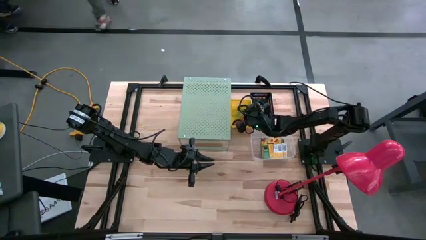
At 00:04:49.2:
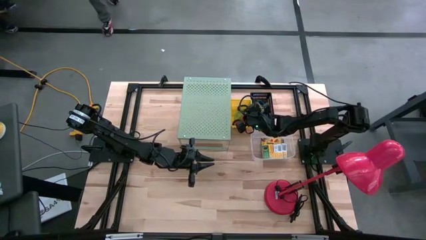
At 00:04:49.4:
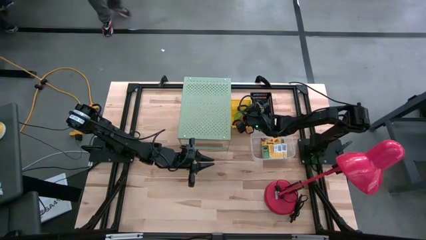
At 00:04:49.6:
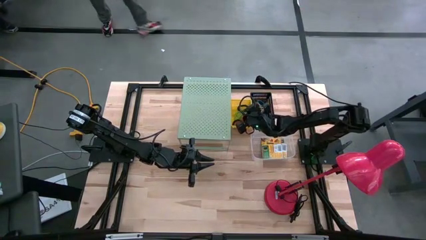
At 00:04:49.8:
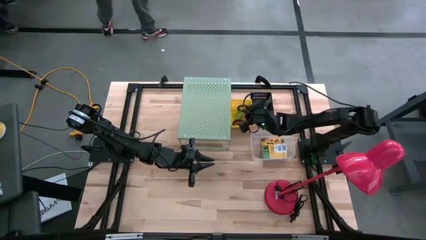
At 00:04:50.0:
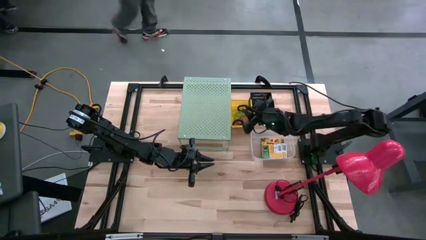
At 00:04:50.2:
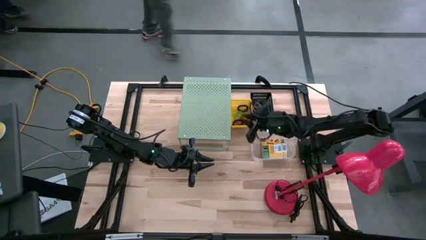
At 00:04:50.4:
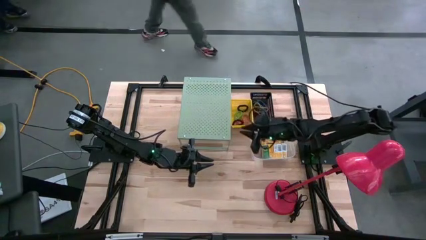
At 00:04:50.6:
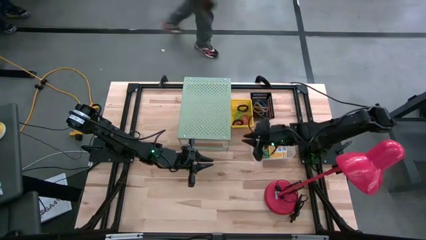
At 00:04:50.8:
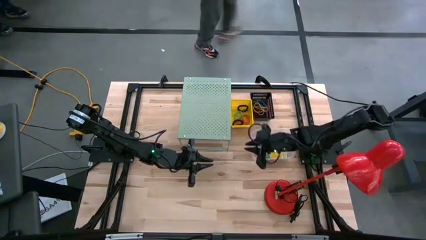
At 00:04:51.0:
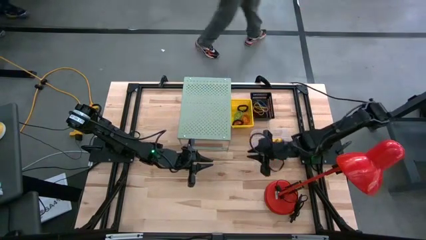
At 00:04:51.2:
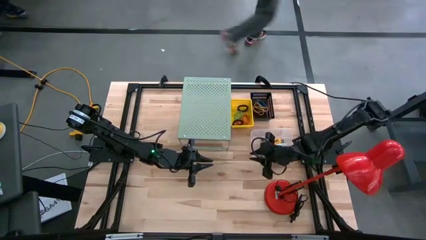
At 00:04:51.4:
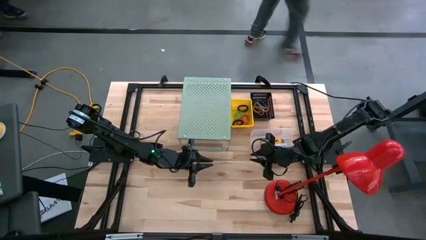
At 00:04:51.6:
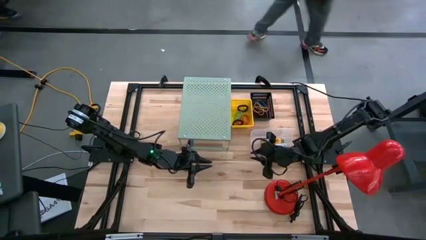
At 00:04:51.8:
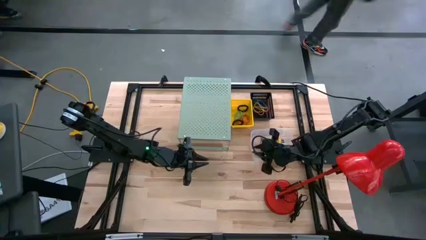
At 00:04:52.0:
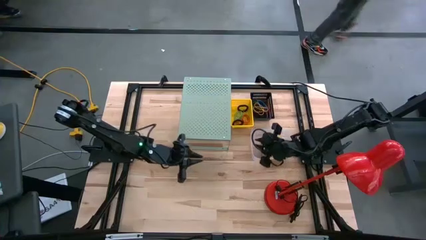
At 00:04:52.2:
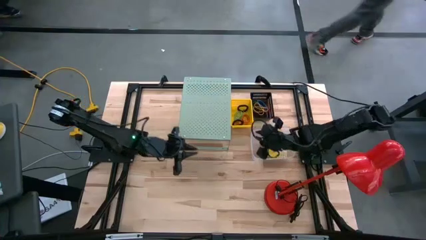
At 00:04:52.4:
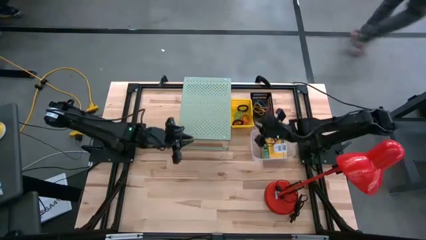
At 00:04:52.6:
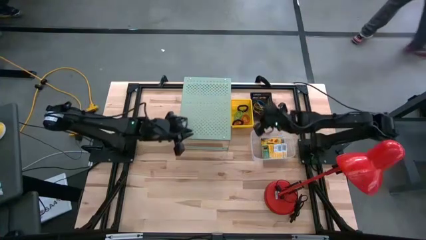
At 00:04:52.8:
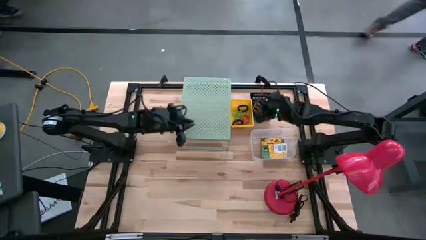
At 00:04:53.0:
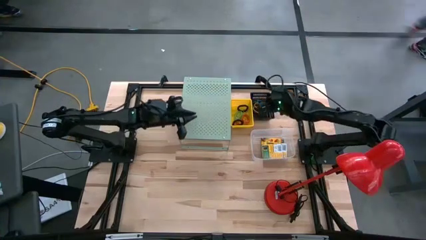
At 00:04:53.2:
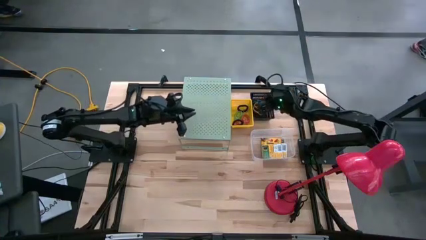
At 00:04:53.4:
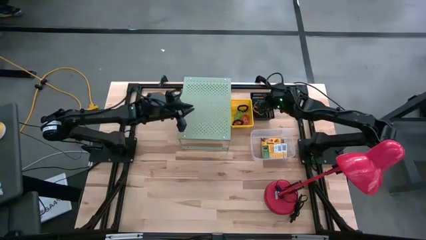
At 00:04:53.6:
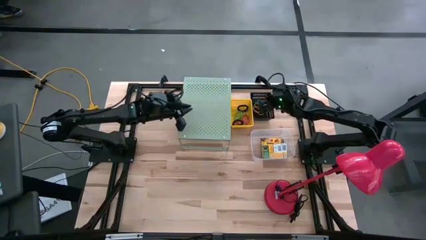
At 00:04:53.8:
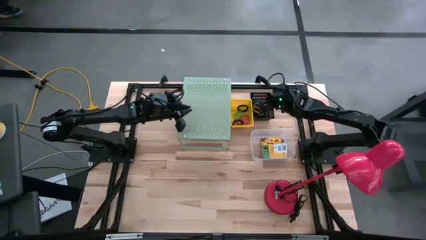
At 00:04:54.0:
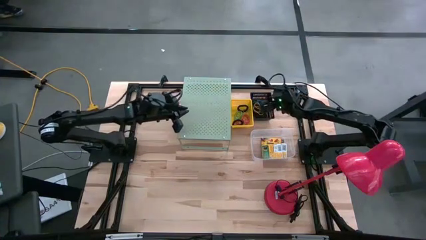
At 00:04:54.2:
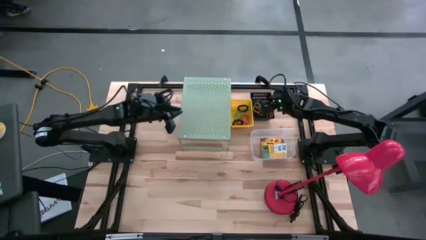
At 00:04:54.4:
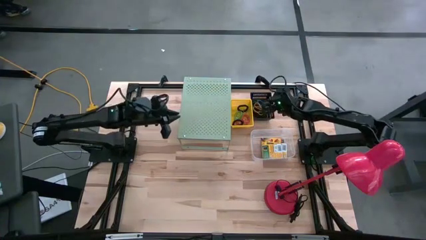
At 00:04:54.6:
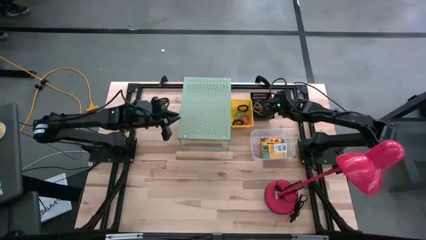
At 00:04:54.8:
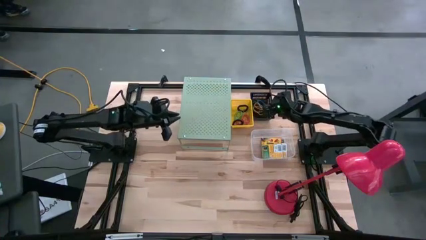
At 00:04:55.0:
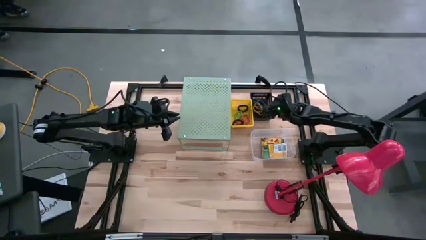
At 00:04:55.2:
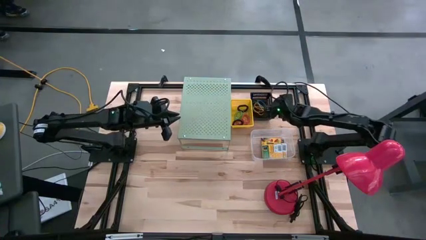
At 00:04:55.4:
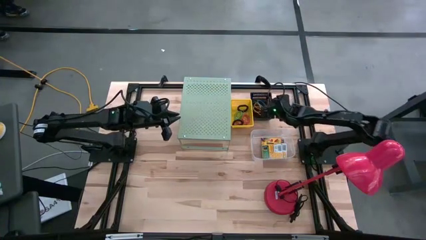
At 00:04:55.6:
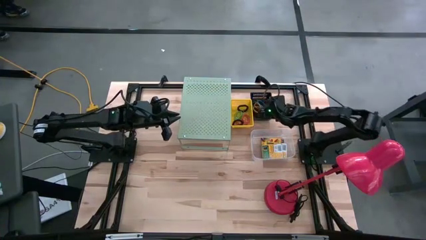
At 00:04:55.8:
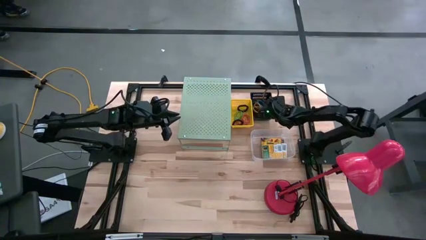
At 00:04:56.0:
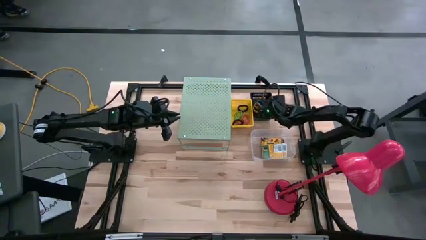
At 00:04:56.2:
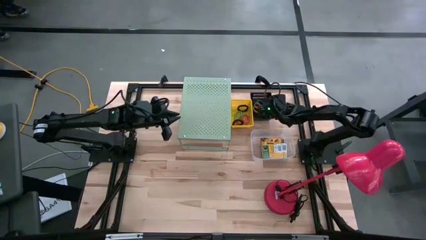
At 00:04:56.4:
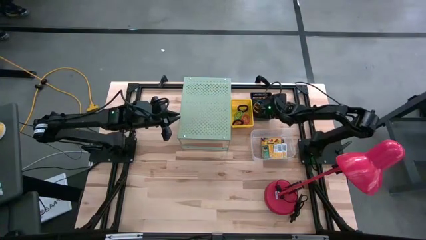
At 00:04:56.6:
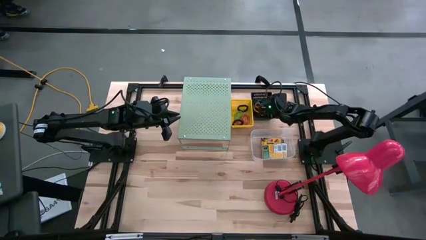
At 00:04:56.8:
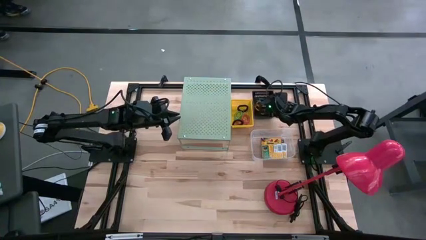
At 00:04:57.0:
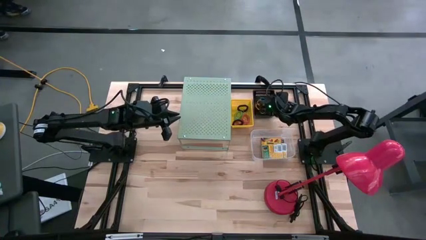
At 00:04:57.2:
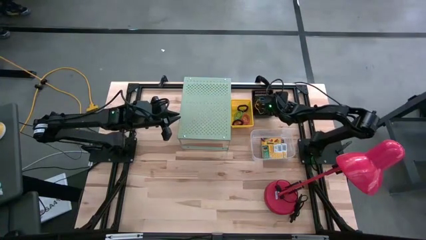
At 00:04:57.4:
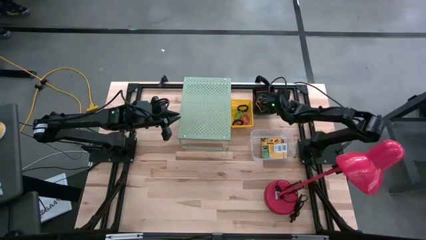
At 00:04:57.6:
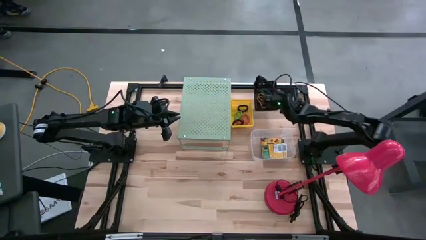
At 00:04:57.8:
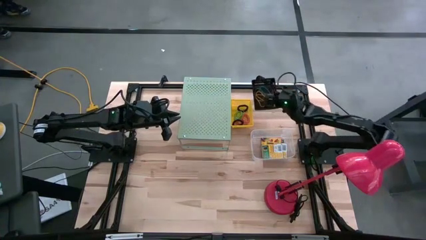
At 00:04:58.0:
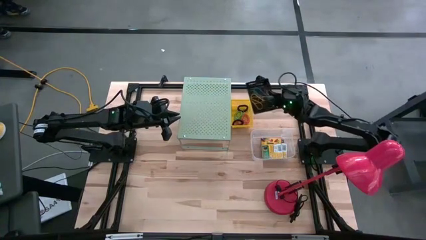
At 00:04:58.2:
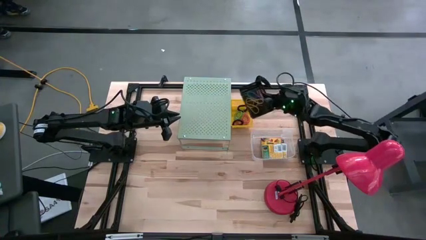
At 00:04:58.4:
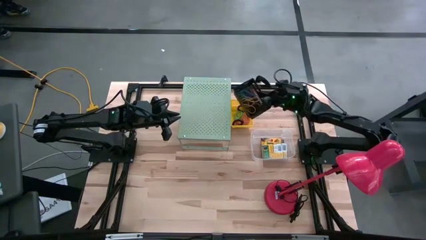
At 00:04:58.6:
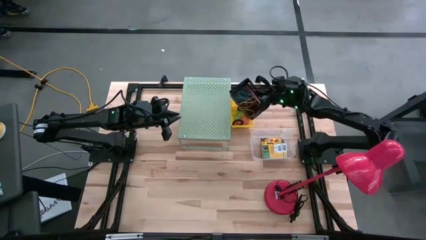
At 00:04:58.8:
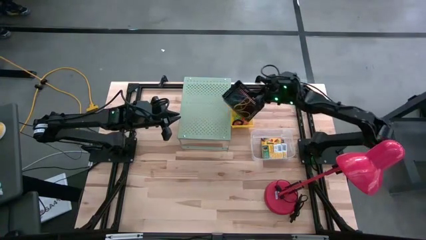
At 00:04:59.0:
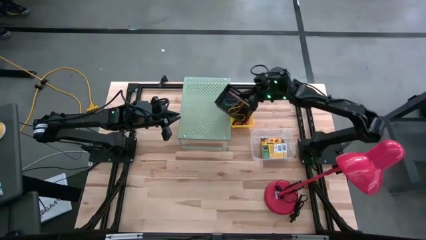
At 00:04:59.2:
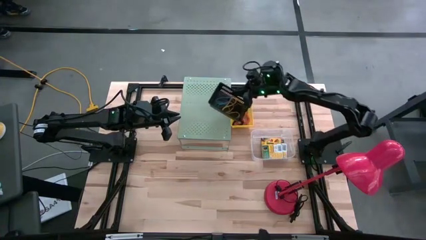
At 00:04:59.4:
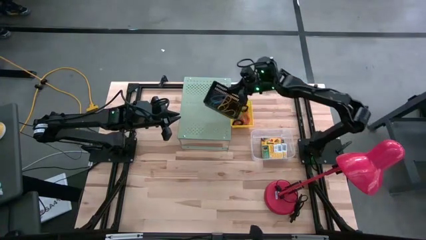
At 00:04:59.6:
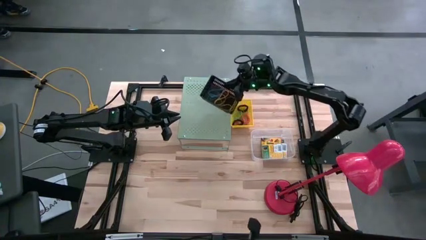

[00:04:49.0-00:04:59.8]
Task: Pick & Place Office Desk Supplies
Put the black bin with sorted rubber bands on the shelf
